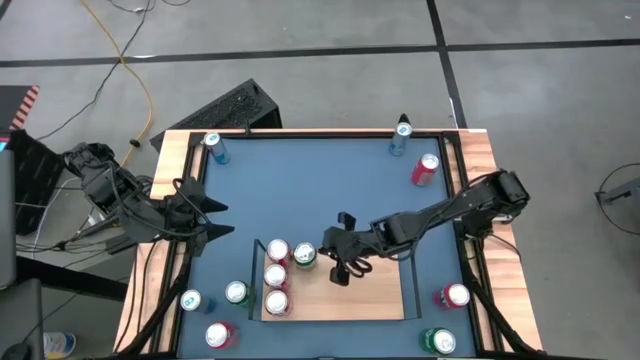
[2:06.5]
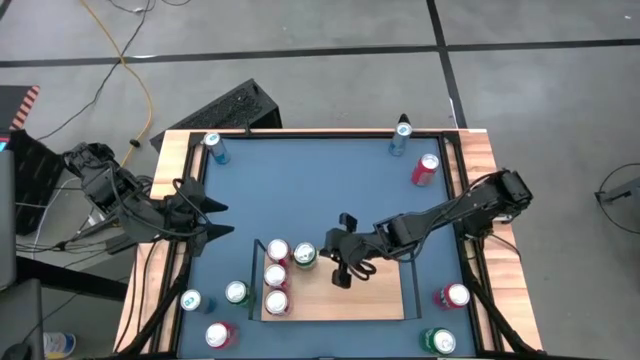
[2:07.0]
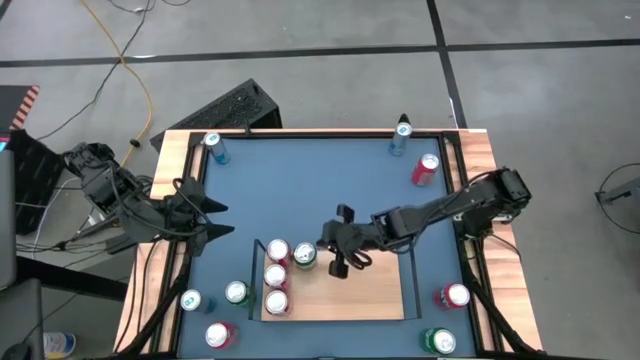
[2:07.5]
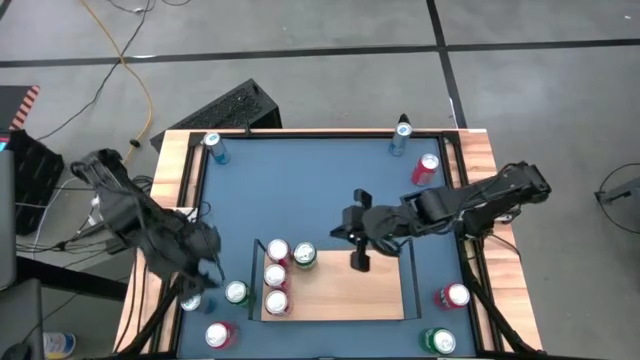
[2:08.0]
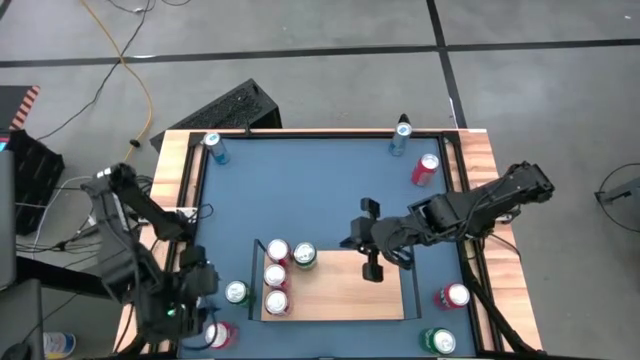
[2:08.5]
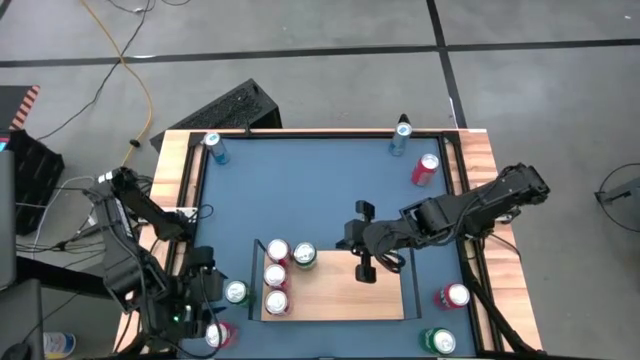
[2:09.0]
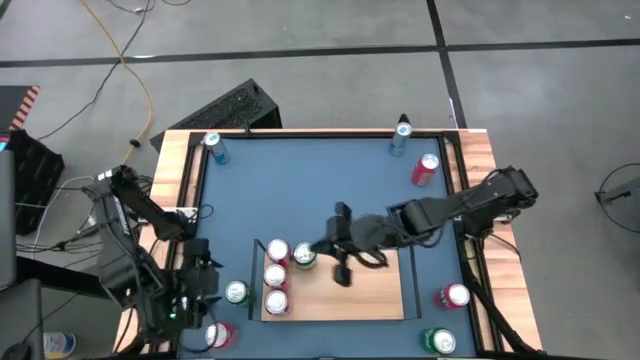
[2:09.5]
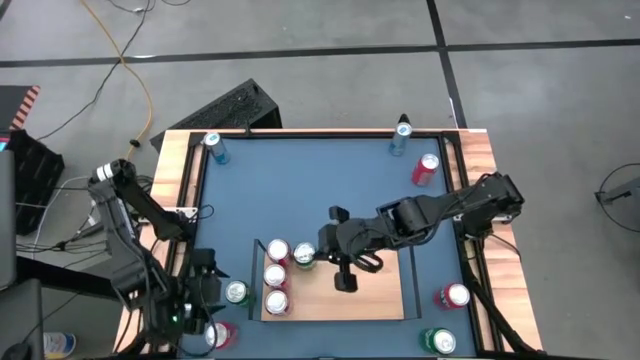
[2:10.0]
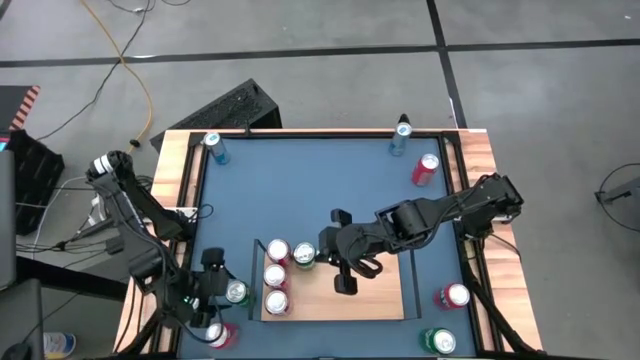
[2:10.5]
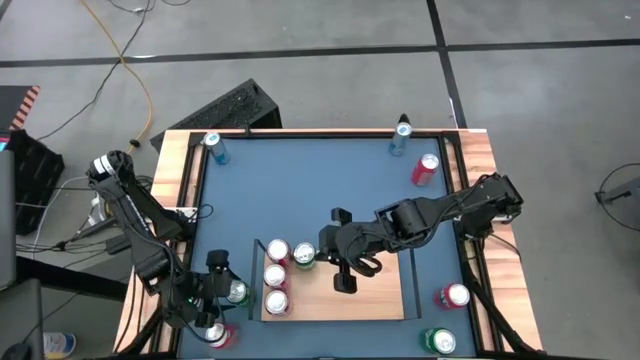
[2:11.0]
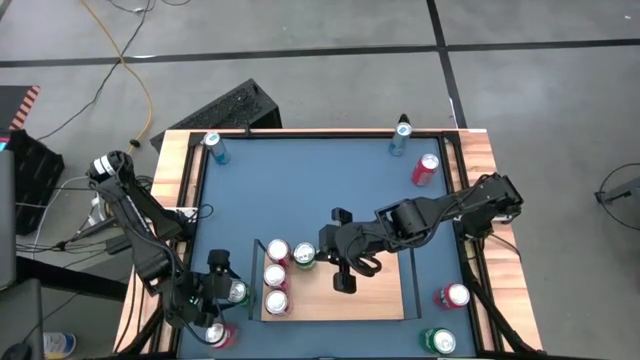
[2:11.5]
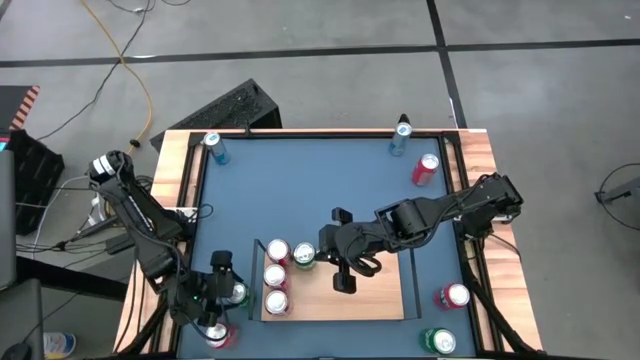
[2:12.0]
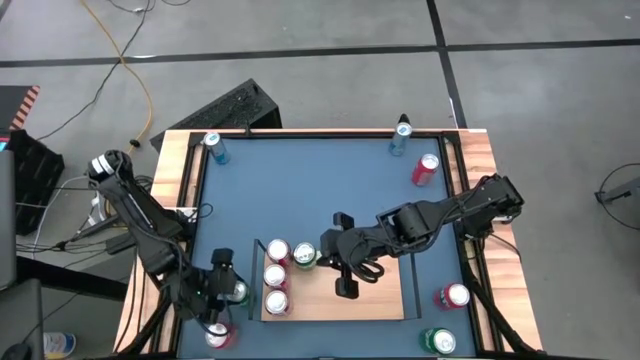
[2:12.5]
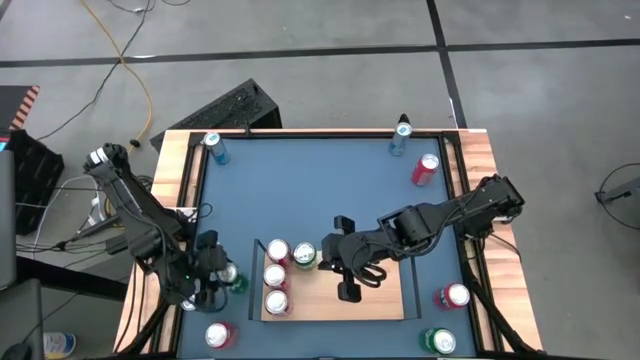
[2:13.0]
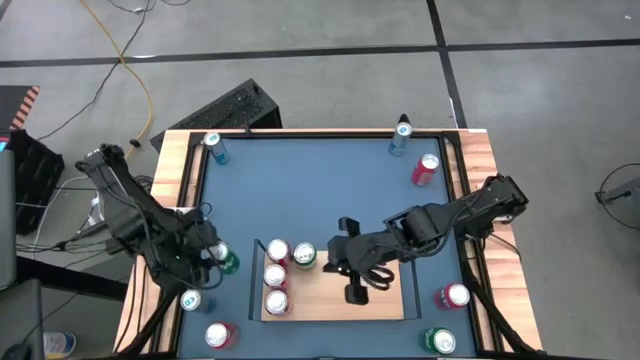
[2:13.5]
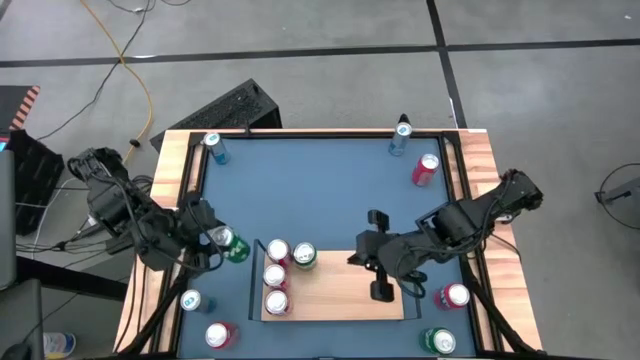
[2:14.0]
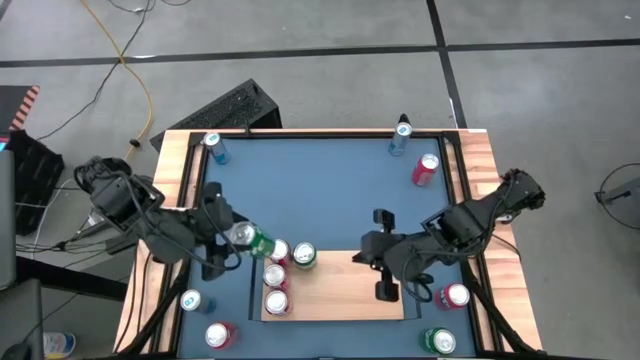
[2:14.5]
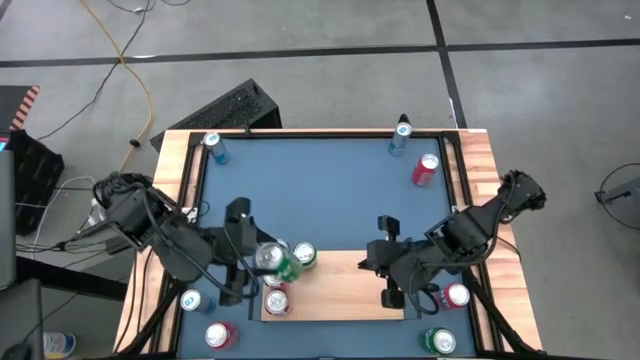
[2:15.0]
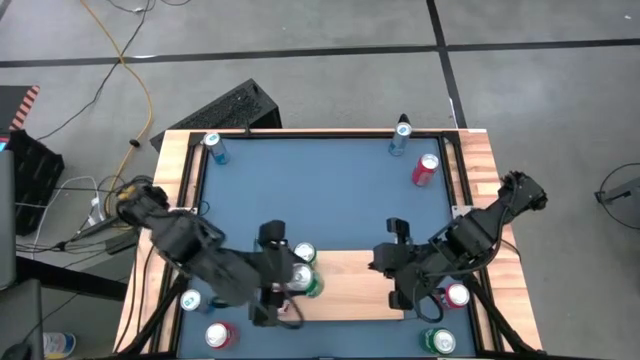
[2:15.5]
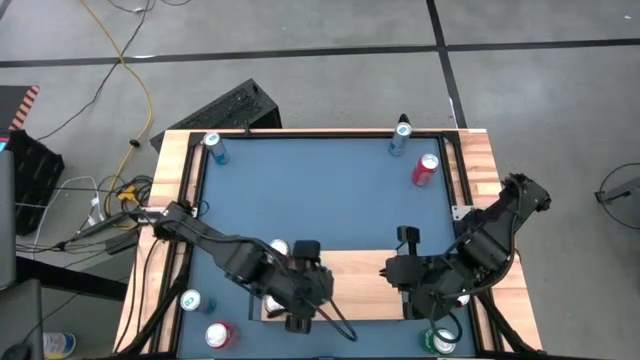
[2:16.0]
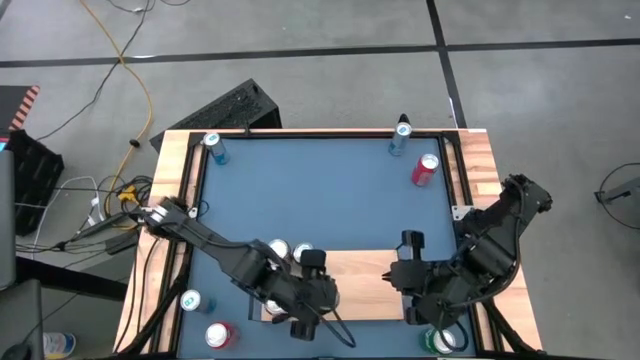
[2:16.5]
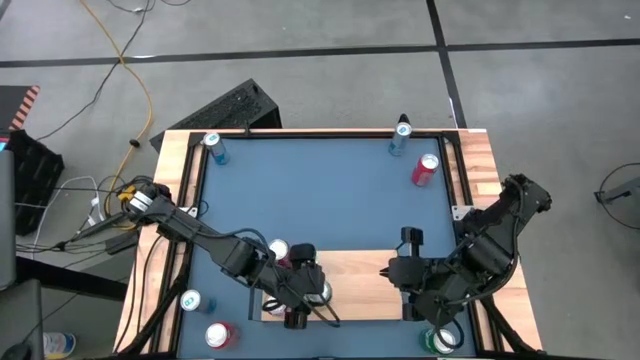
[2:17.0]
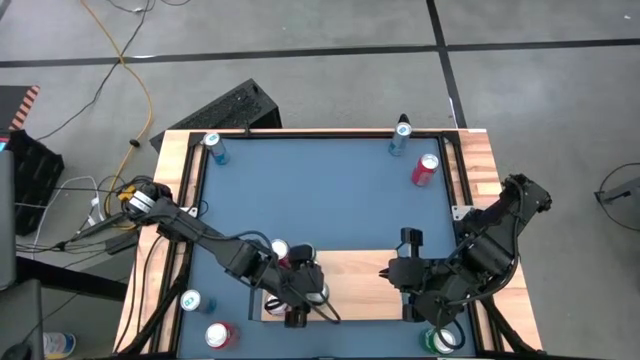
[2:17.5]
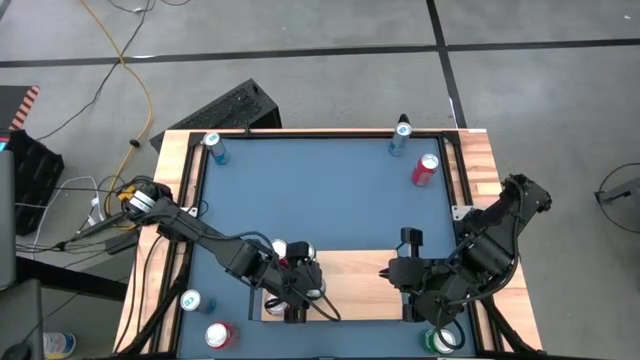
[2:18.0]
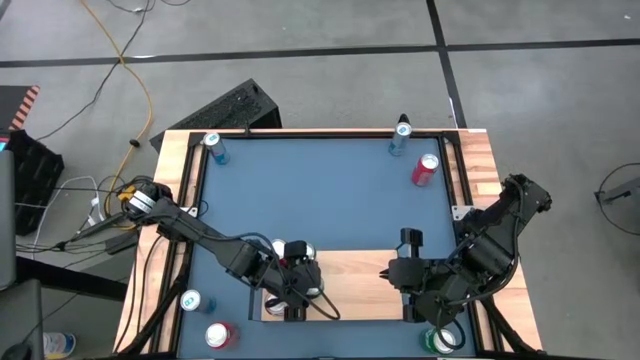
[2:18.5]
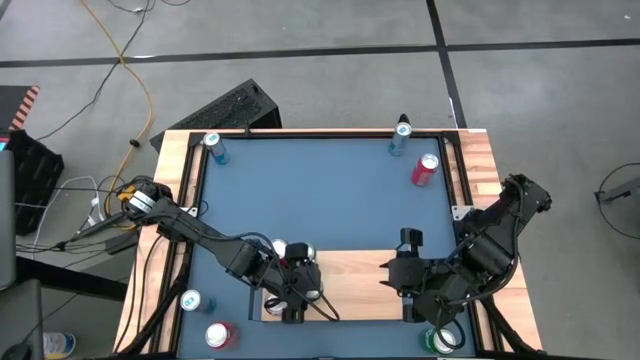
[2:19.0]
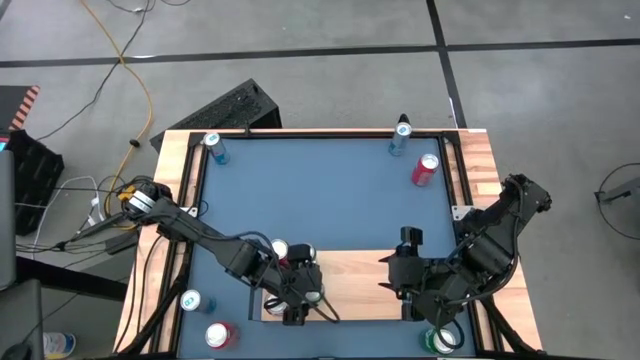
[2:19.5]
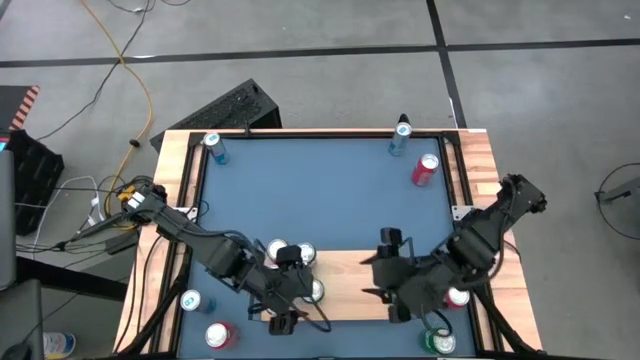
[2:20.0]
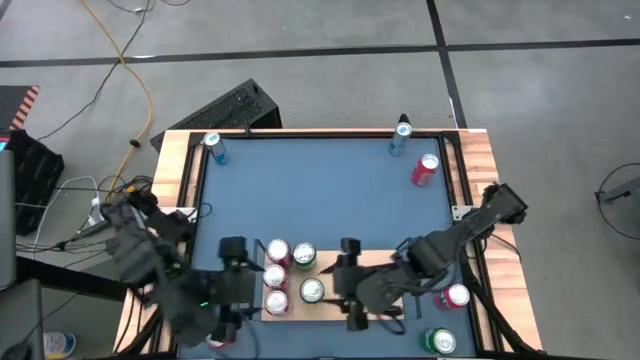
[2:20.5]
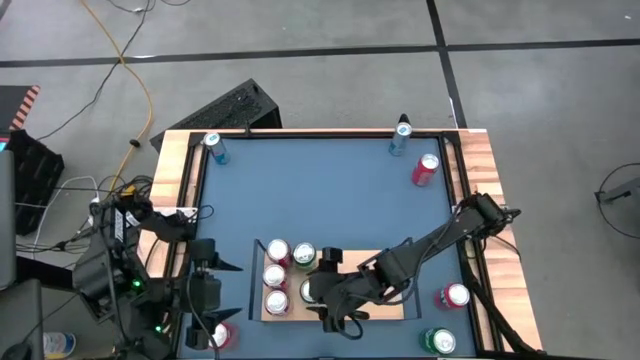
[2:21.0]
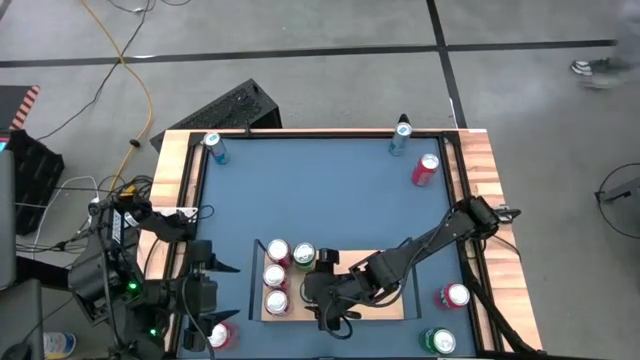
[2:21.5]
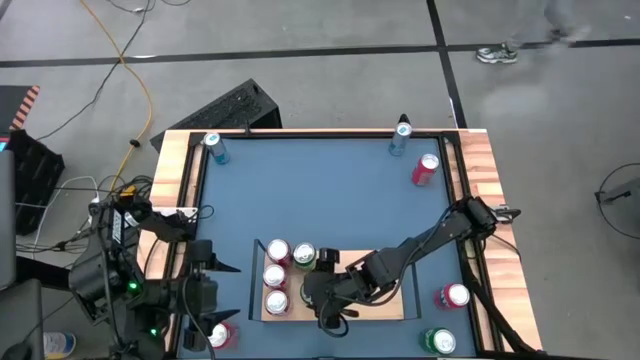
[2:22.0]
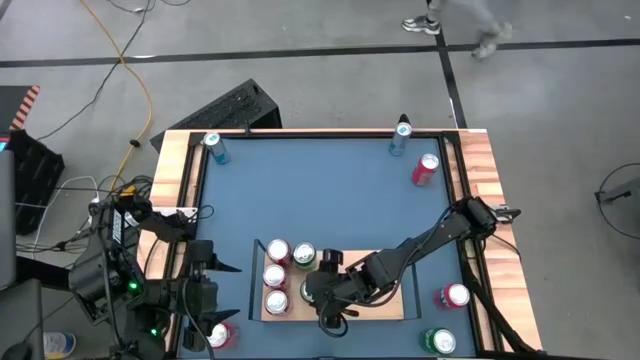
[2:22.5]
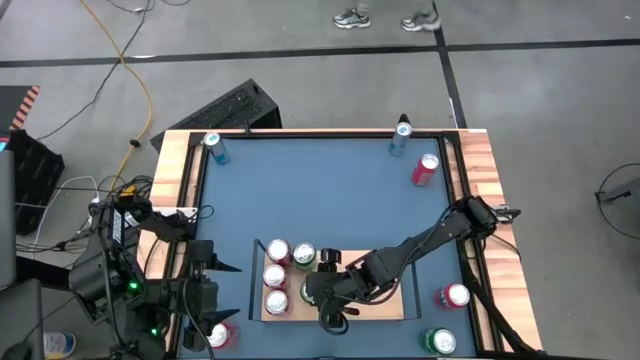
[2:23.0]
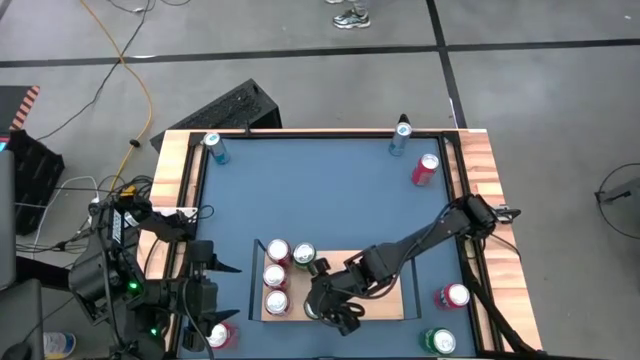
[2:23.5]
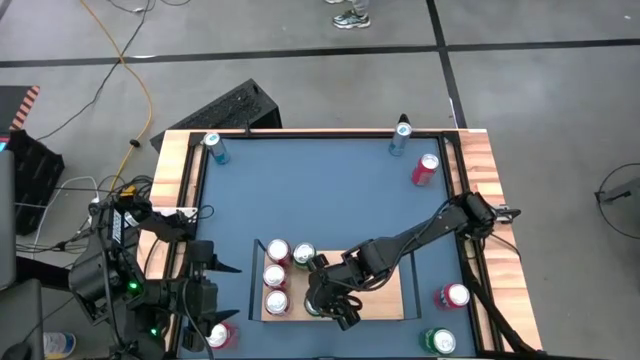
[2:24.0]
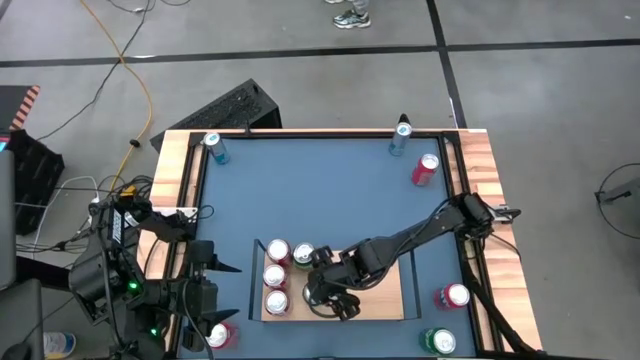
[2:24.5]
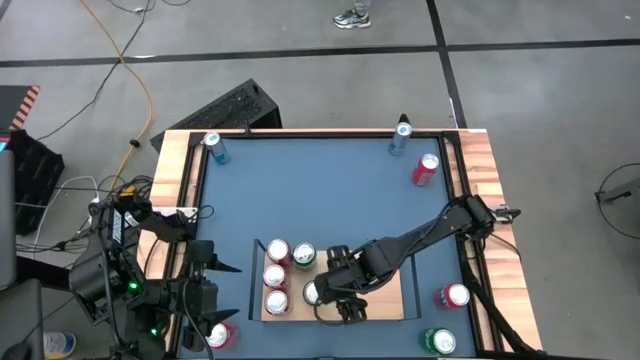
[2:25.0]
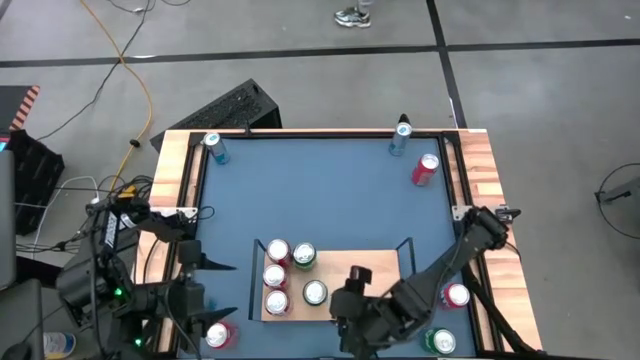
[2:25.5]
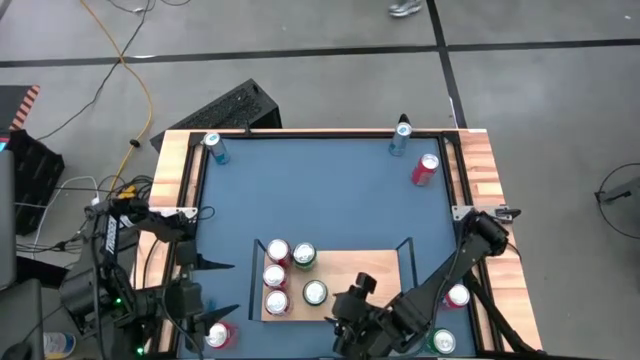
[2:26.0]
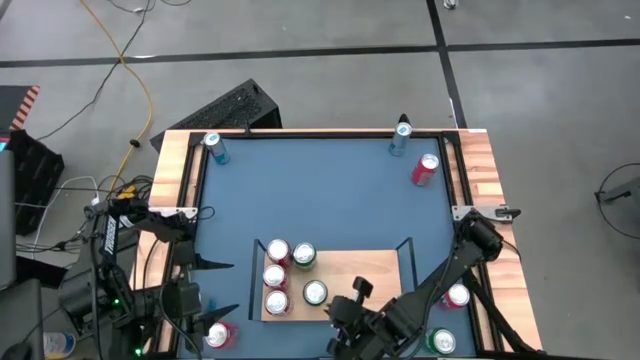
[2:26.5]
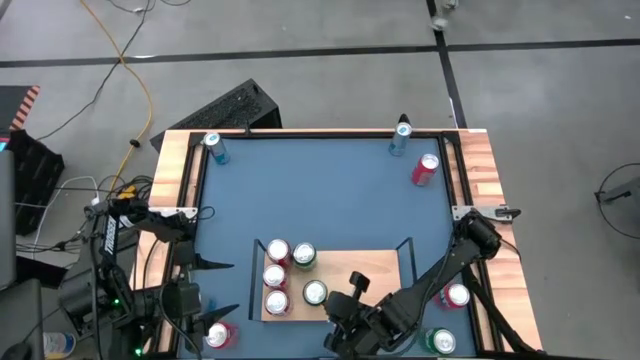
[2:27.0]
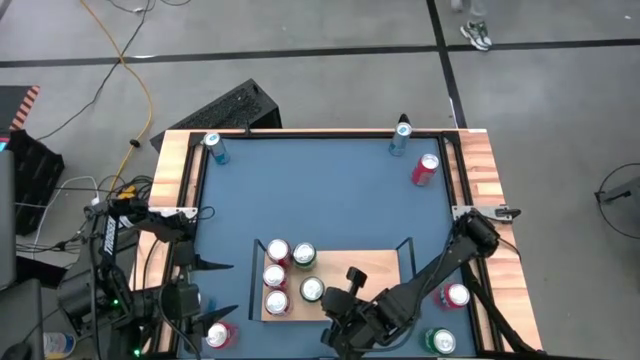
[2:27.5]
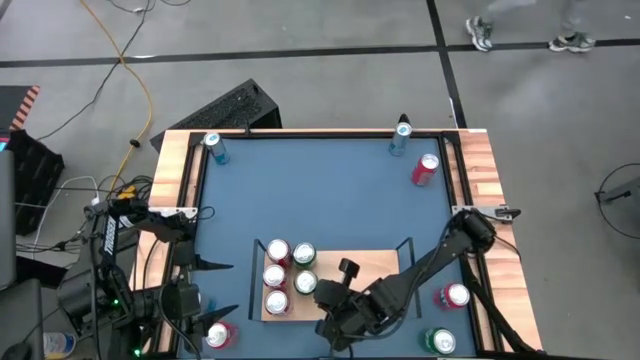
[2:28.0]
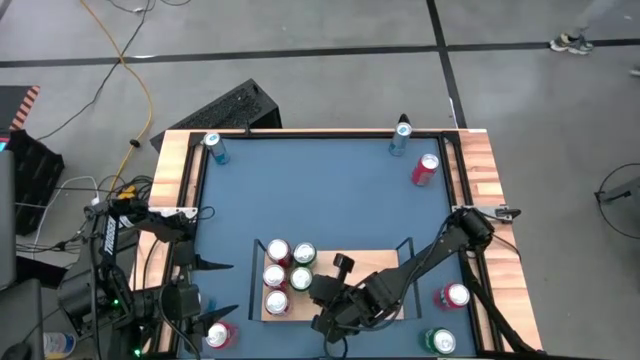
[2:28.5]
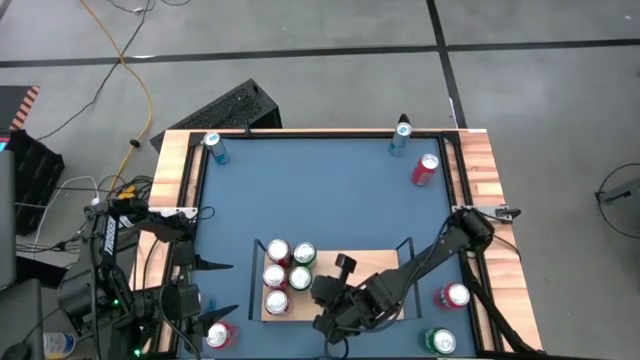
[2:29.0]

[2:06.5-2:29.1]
Task: Place canned beverage on shelf
Put the left green soda can on the shelf aligned with the other green soda can
